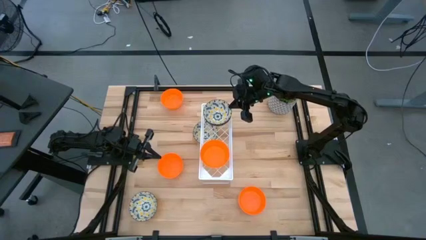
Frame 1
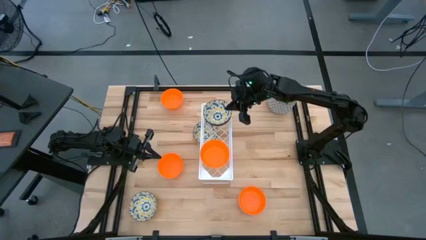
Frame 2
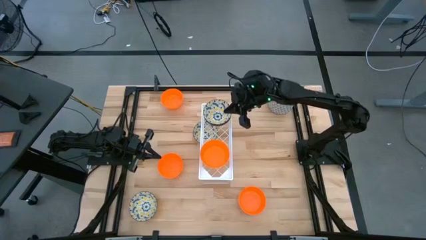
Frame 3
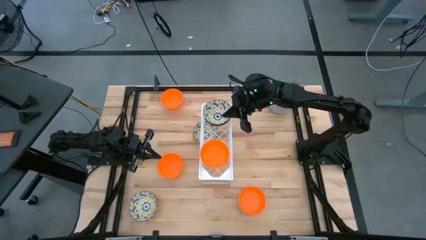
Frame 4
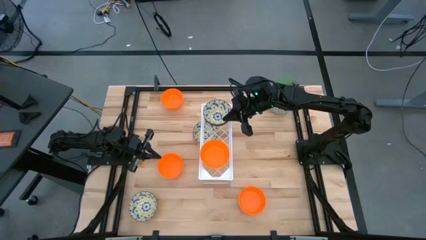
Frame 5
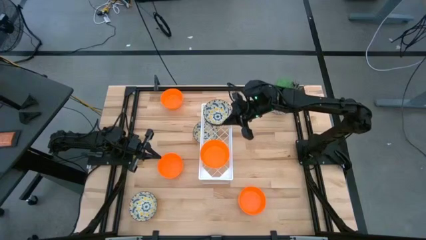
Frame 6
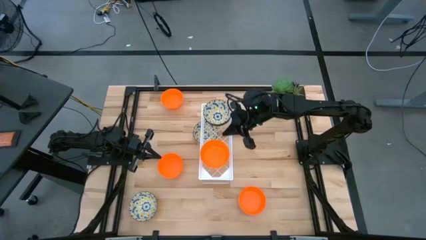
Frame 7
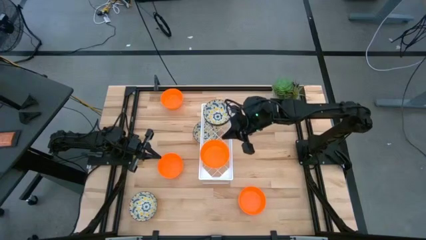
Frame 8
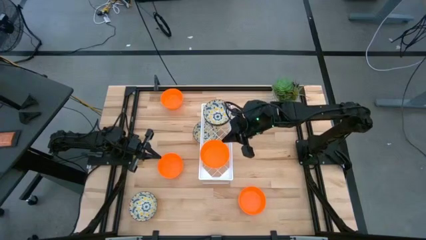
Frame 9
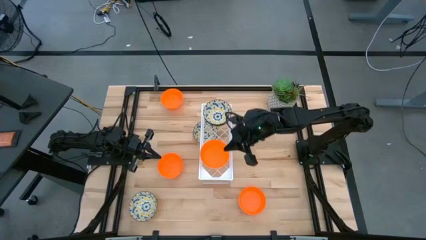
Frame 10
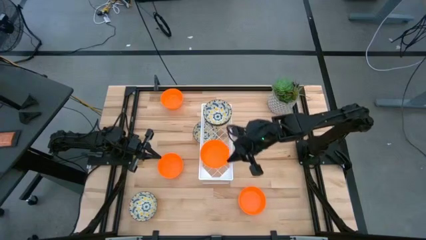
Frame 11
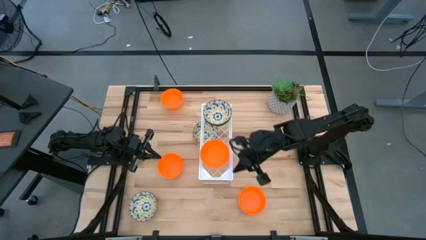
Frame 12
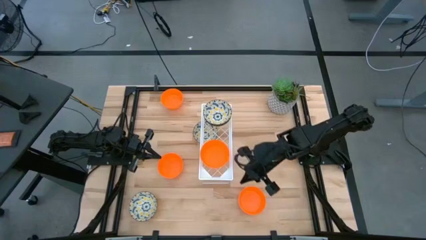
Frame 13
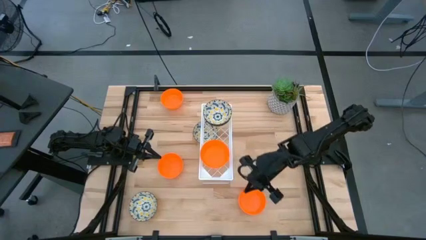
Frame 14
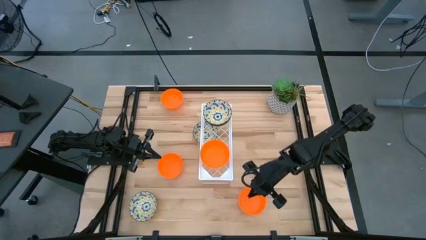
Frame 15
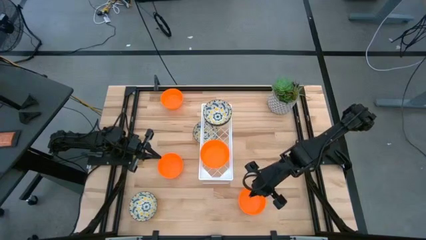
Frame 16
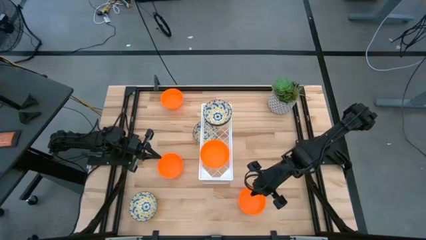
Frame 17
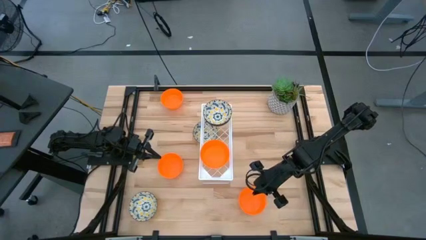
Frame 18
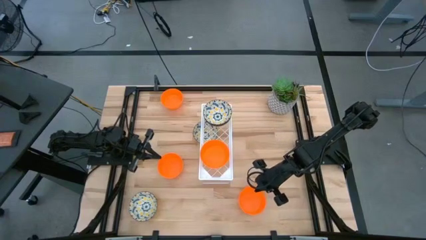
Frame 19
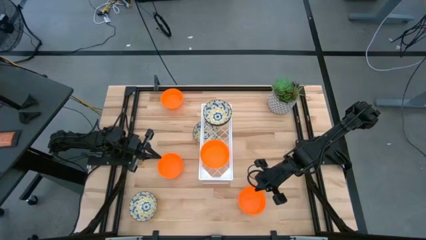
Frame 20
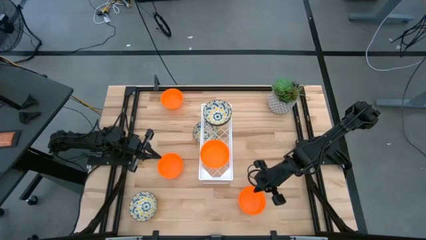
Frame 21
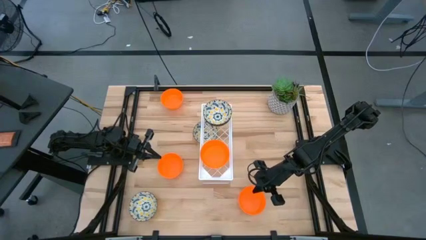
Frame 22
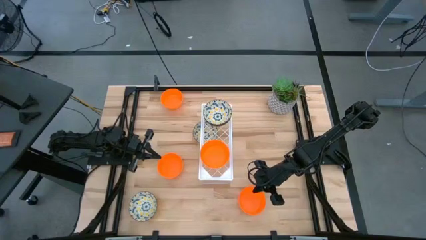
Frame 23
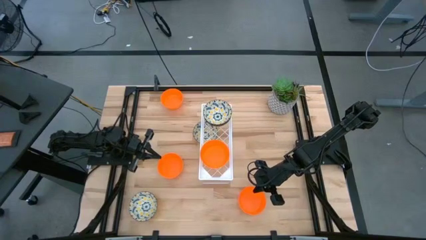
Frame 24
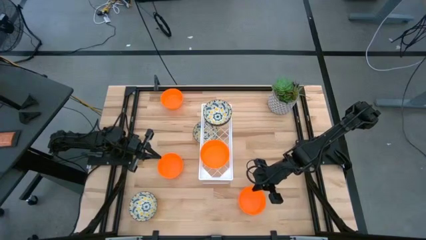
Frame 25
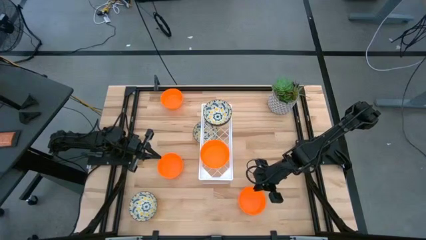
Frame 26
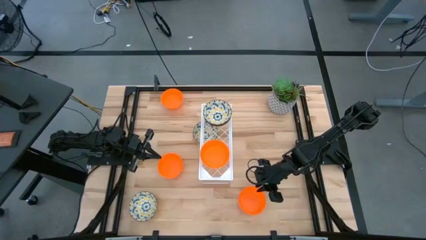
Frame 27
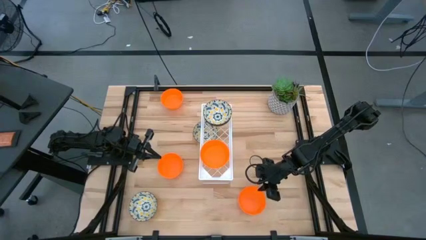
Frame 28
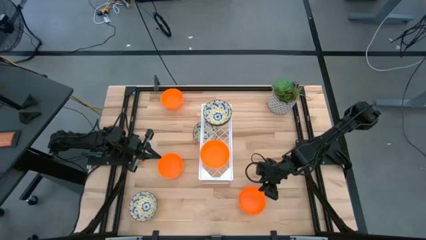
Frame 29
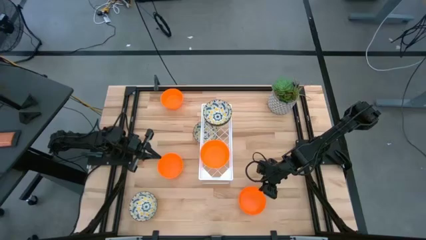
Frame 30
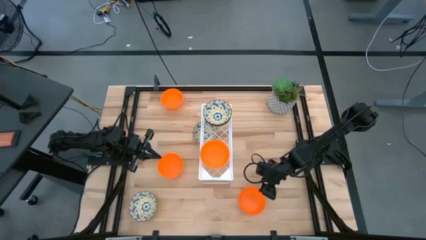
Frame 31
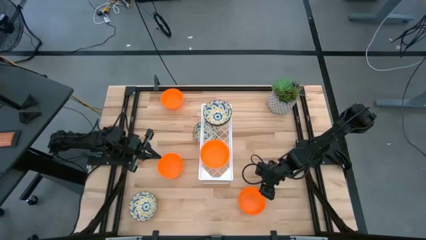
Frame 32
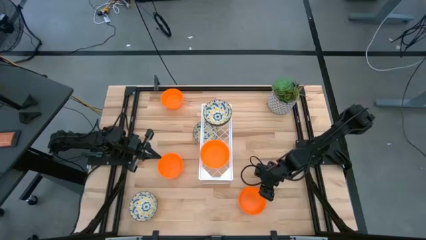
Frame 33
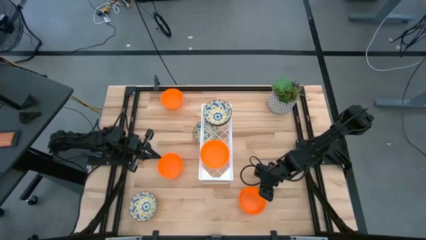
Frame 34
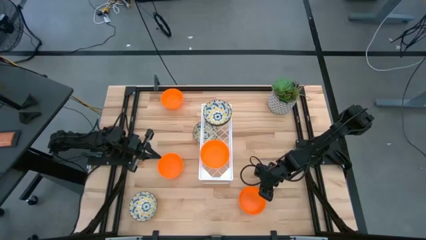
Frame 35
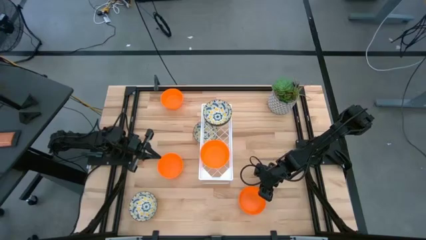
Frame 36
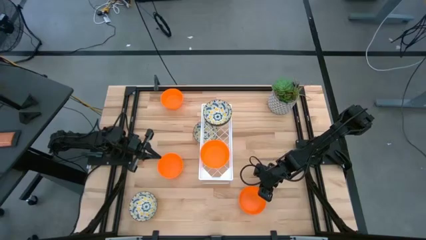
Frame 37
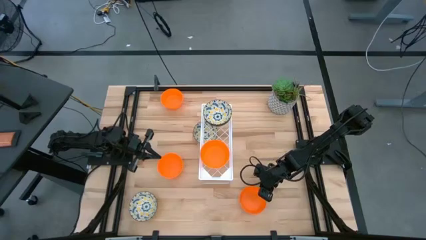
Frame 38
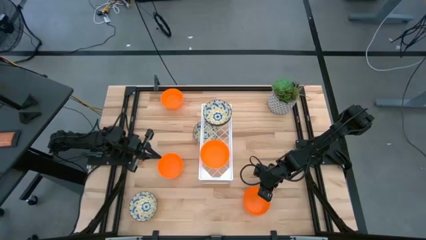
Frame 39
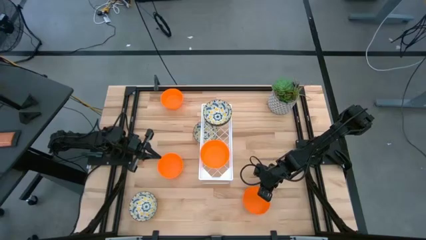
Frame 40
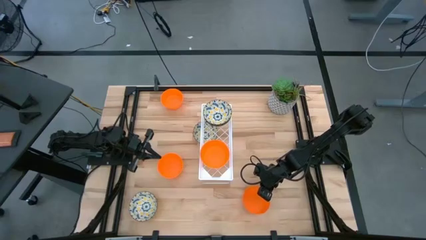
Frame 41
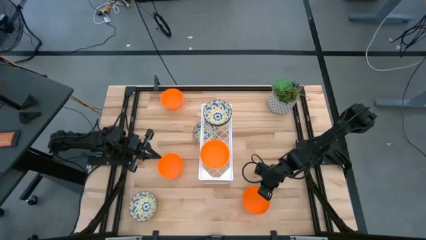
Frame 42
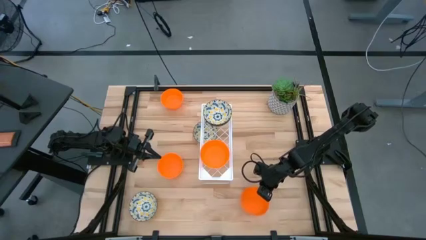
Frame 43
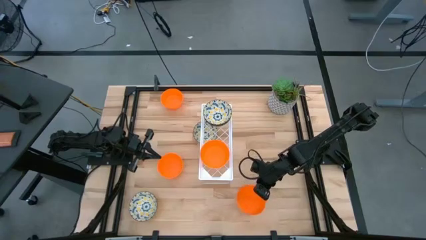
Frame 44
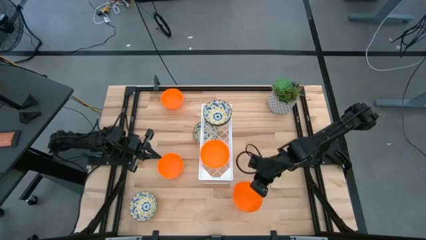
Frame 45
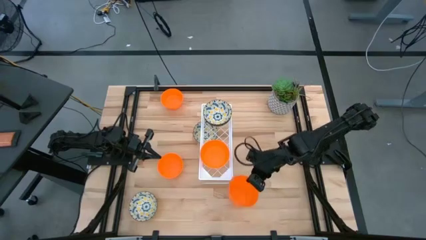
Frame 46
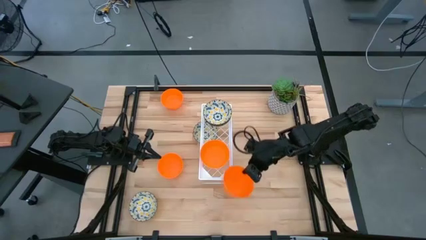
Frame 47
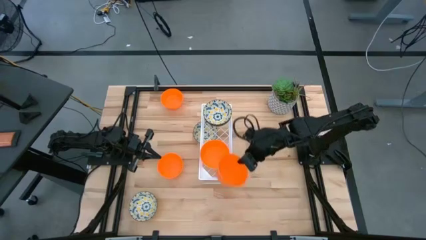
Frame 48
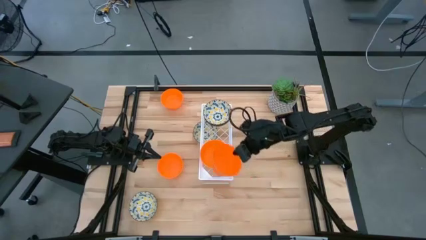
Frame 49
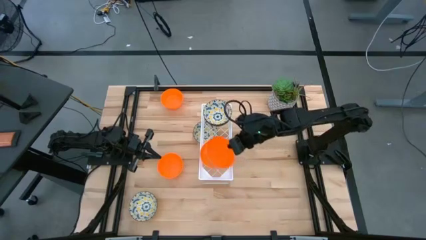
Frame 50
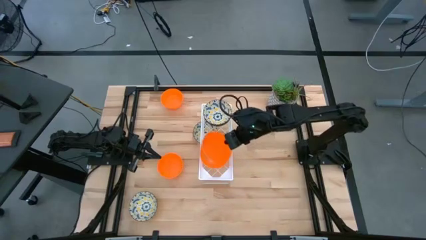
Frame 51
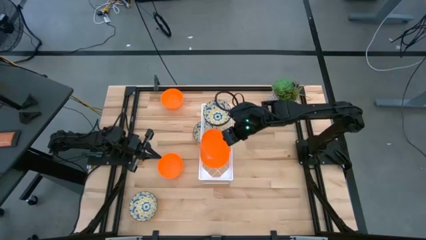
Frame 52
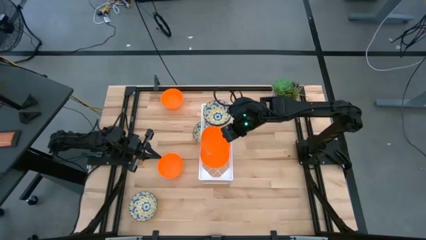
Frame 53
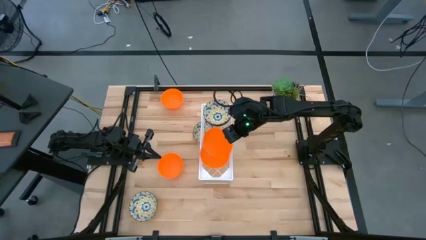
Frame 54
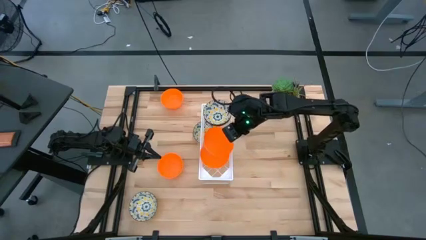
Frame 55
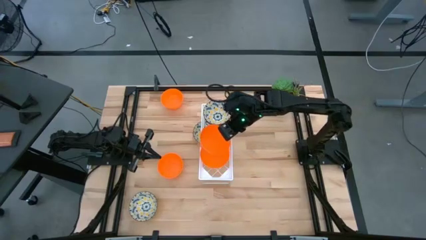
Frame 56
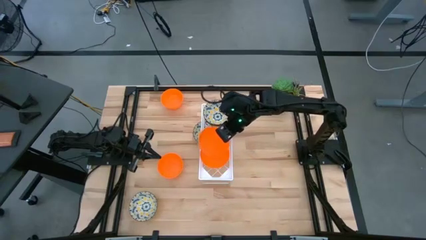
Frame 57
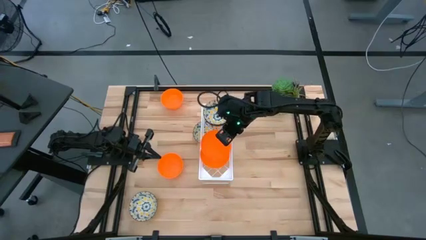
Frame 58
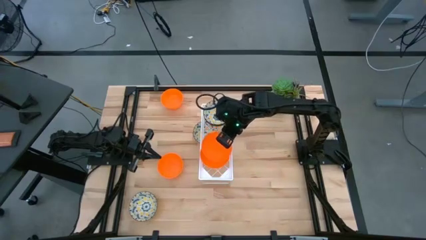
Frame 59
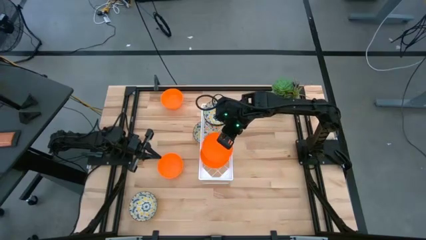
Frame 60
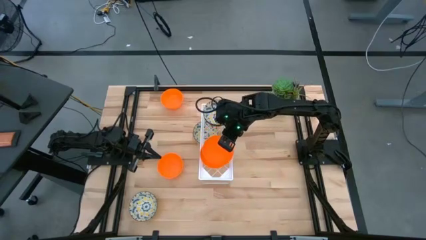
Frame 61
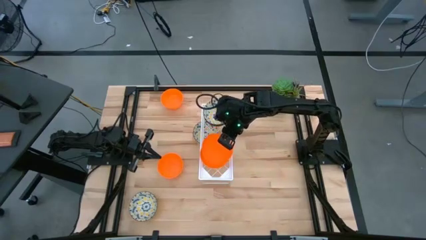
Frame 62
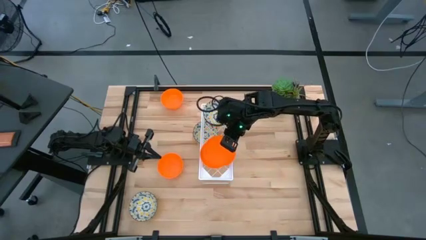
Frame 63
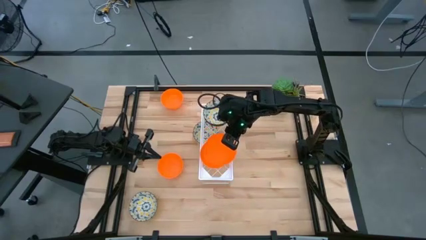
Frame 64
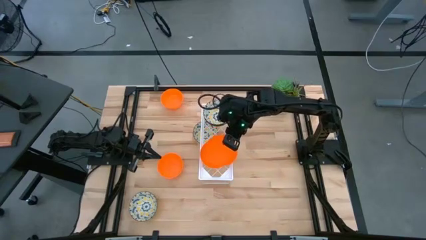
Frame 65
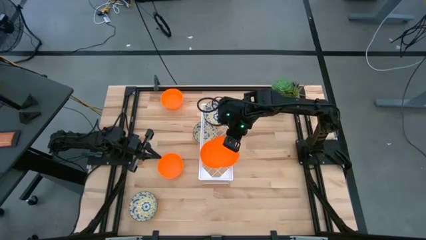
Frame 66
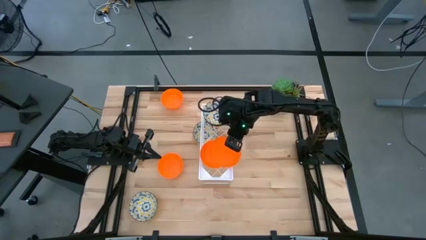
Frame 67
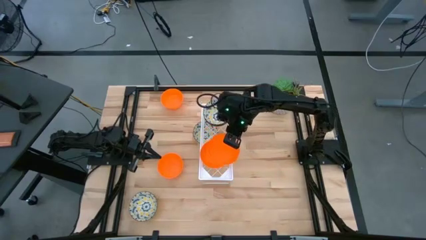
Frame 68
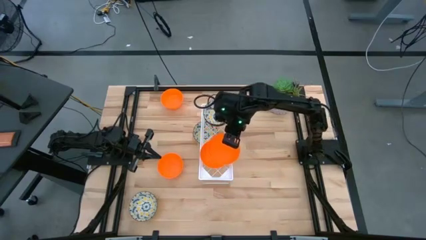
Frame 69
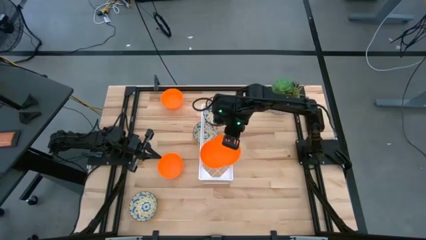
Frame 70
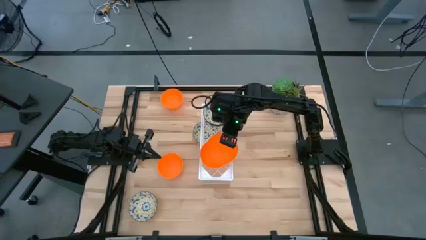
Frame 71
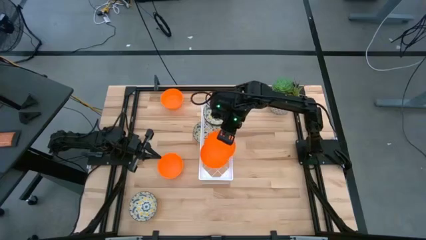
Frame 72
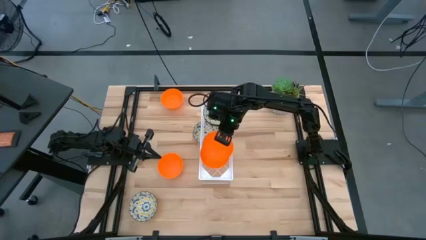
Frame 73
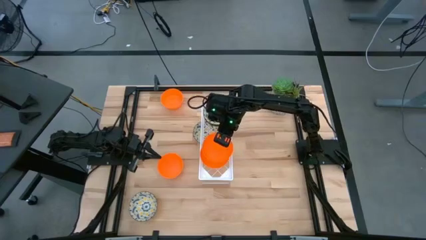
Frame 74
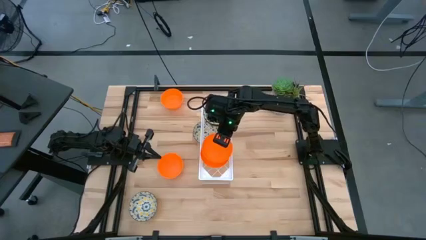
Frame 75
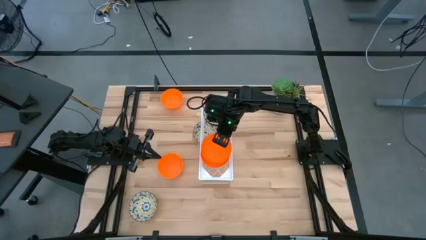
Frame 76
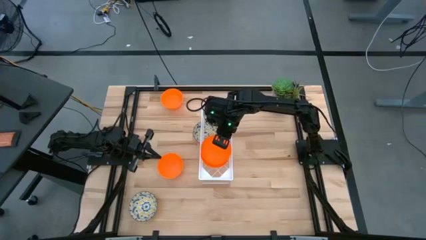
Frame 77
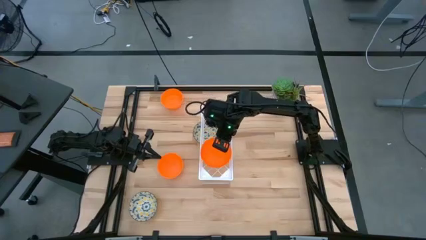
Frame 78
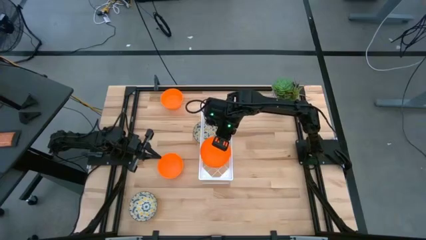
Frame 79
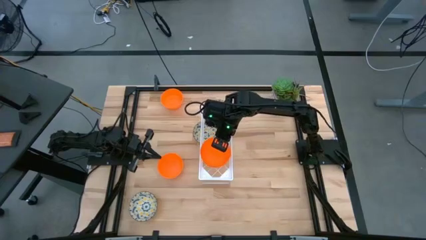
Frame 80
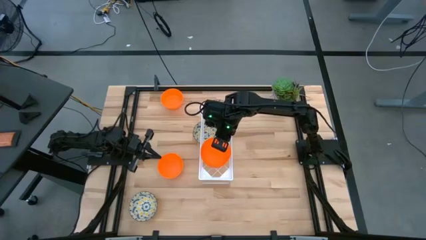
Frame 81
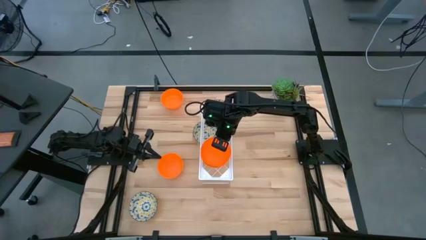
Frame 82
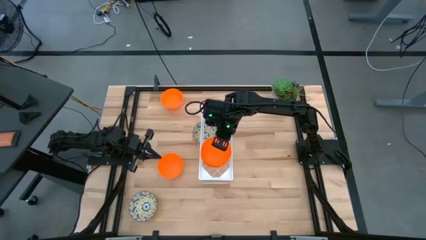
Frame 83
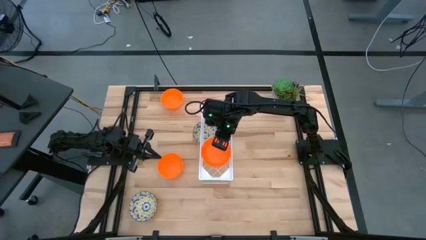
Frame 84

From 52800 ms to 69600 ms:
Task: Pick & Place Mini bowls
Stack the orange bowl on top of the orange bowl on the shelf
